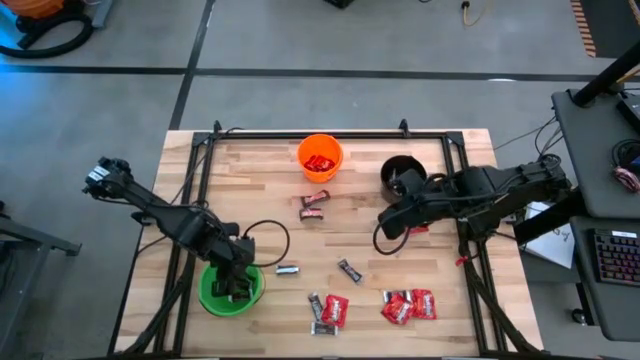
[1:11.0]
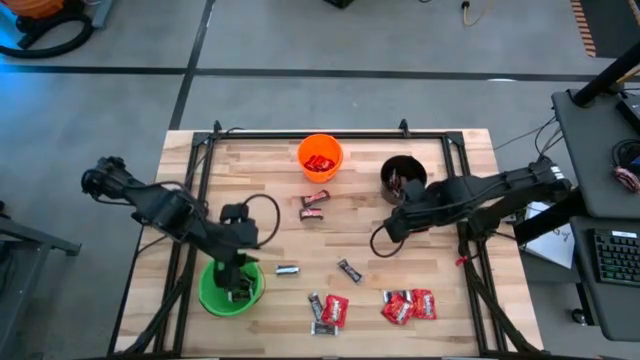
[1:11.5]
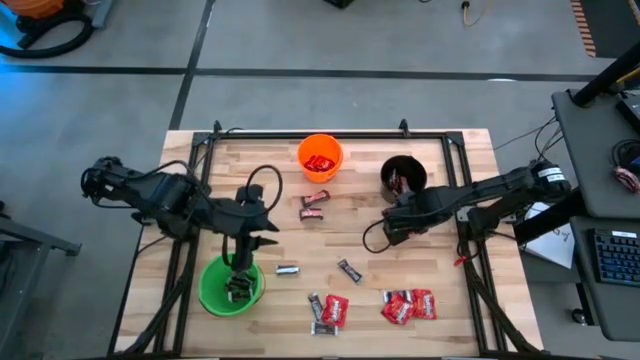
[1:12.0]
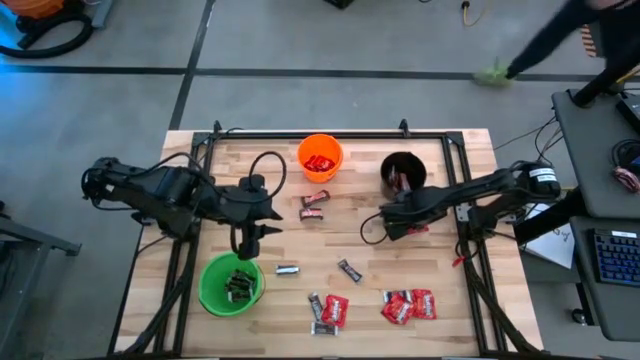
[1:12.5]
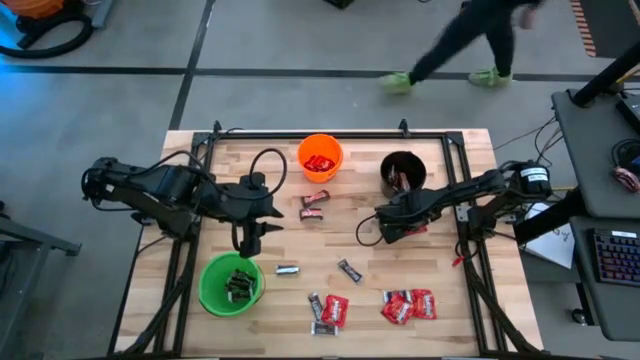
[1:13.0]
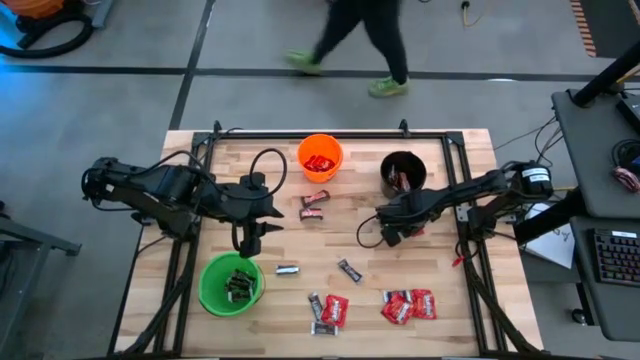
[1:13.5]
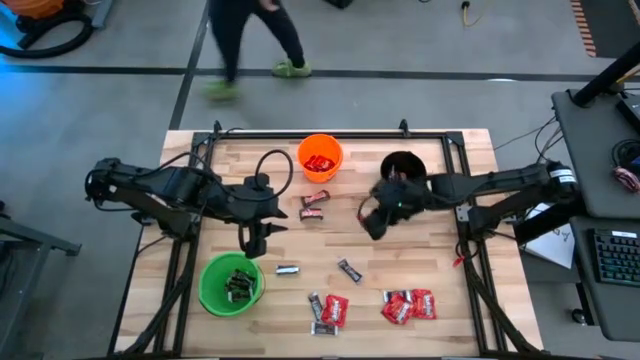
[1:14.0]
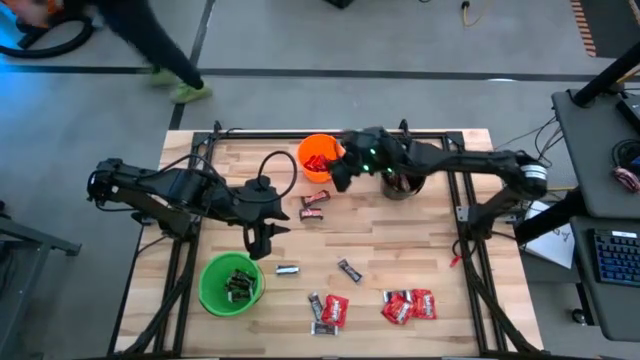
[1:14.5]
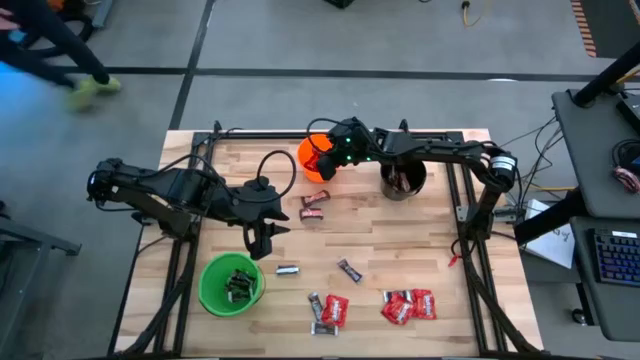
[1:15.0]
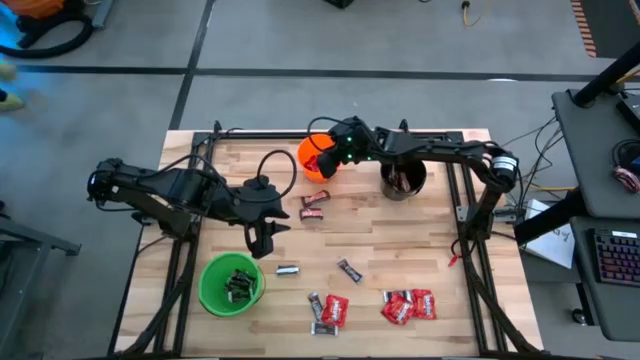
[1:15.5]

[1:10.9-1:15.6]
Task: Sort candy
Put the red candy into the orange bucket

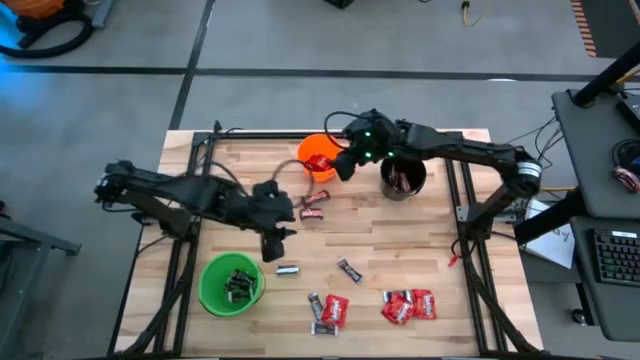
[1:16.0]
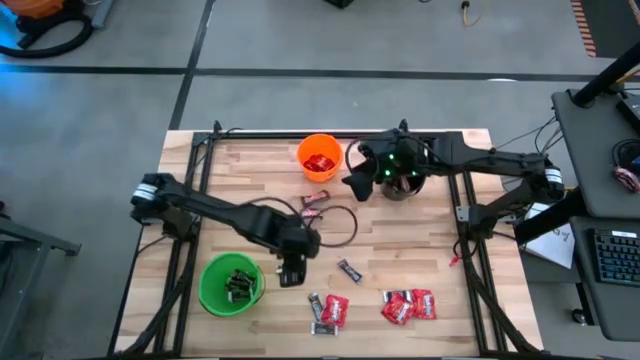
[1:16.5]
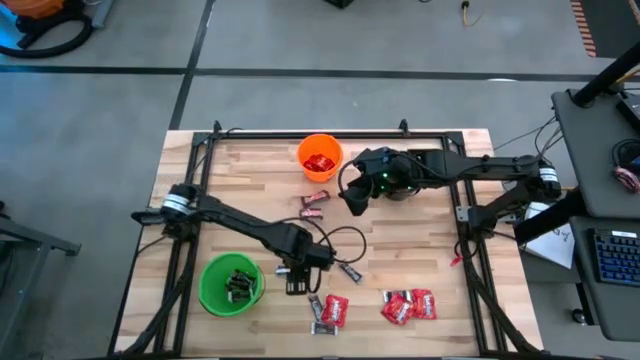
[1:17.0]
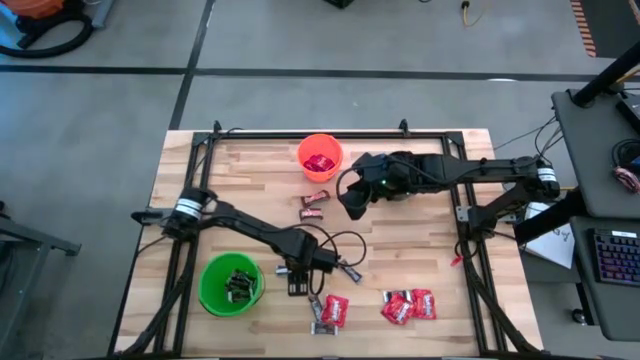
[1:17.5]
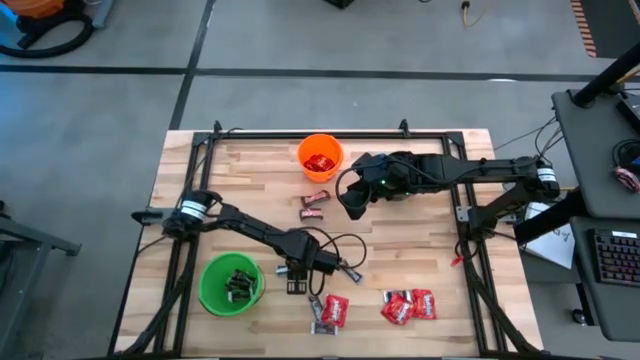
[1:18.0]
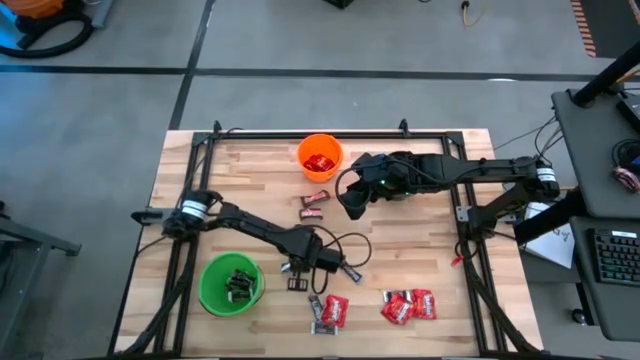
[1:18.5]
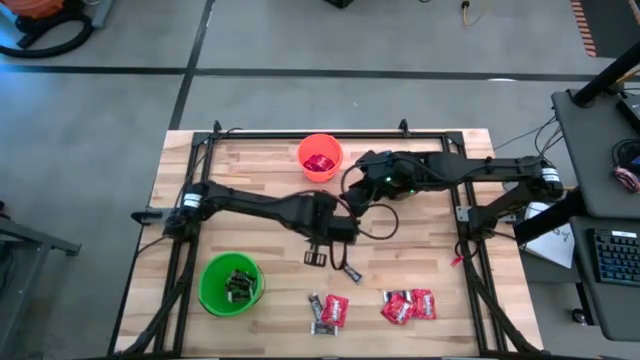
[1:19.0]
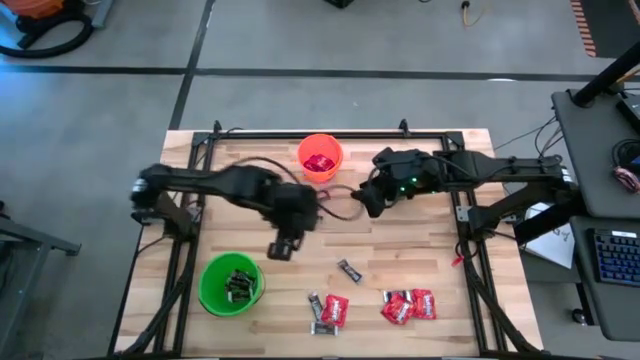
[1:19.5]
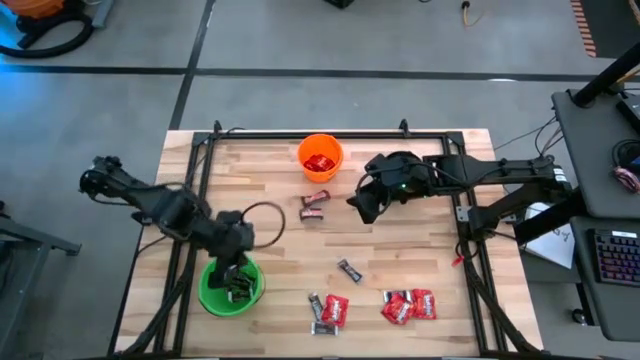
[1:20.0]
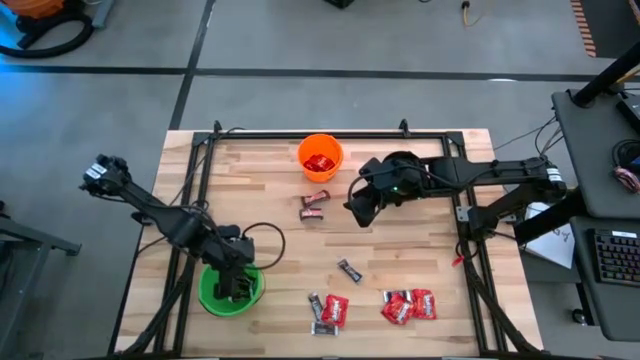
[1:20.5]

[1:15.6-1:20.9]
Put the black chocolate into the green bucket

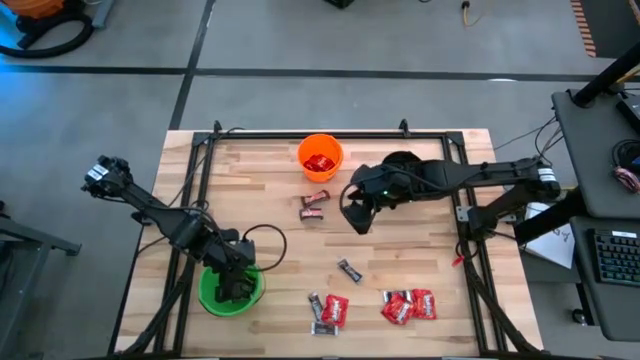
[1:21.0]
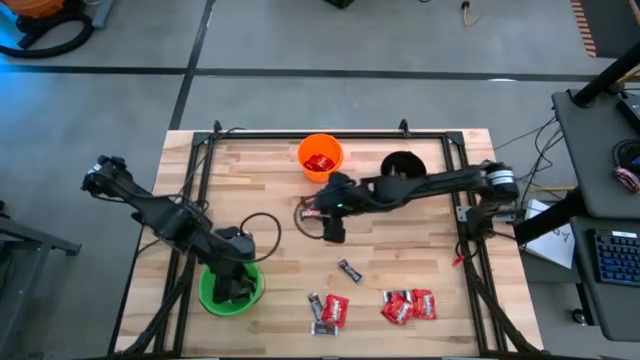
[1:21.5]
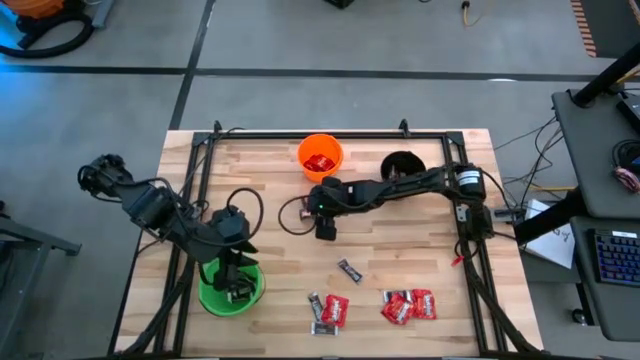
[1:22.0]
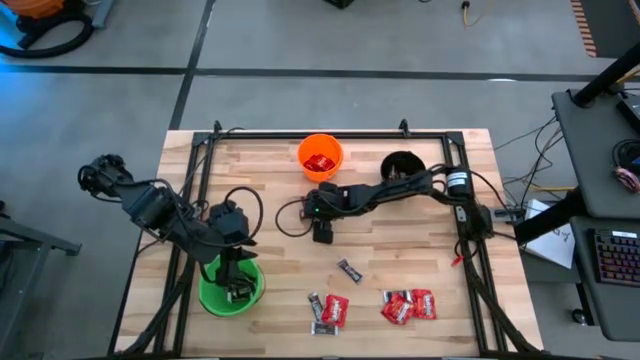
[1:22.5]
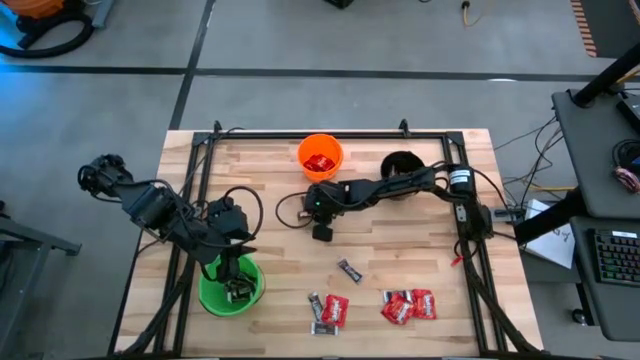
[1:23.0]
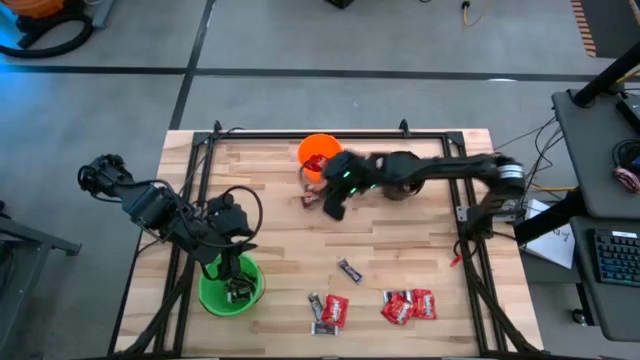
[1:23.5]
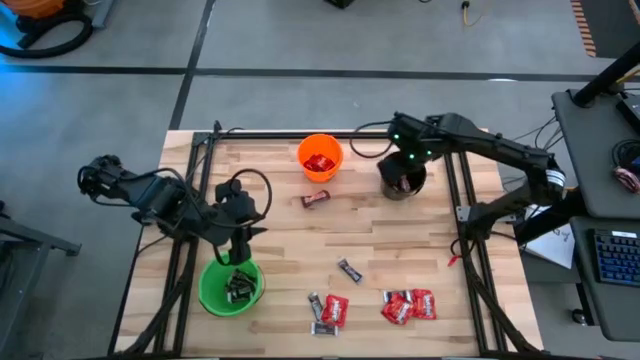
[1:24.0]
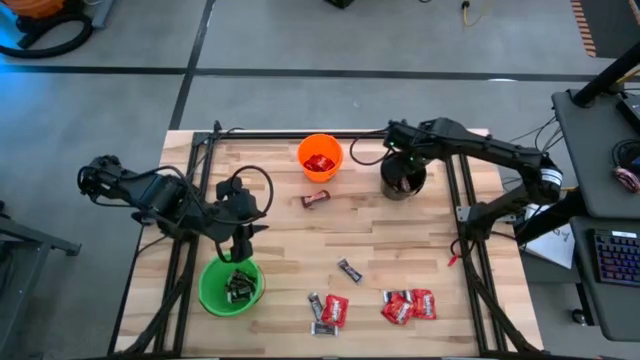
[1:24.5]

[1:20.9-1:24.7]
Put the brown chocolate into the black bucket

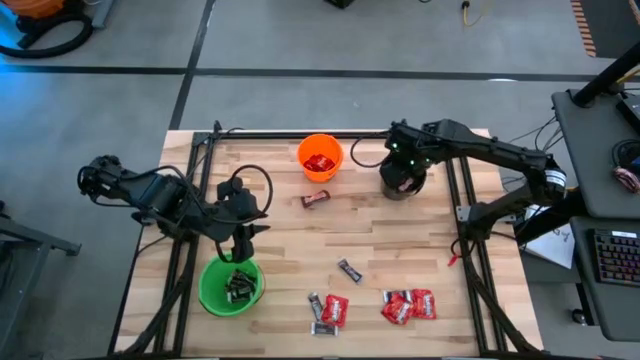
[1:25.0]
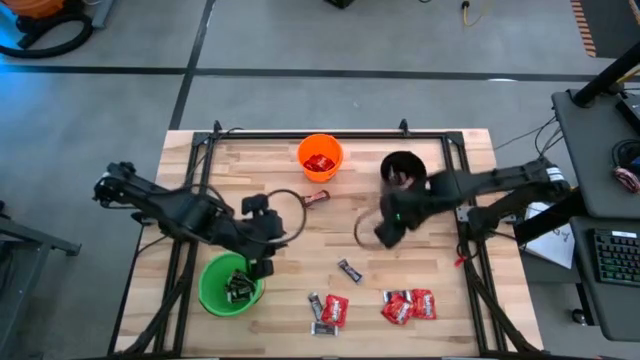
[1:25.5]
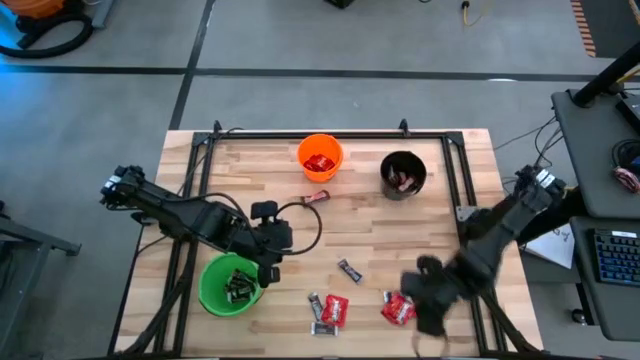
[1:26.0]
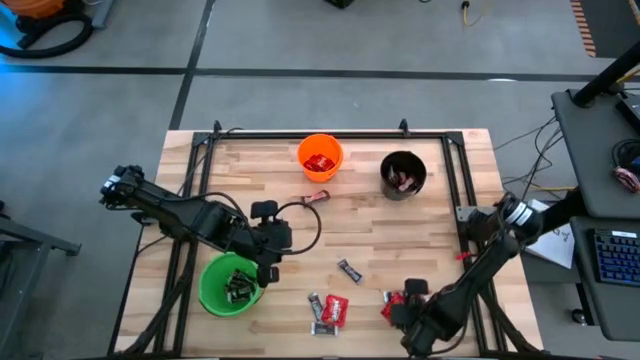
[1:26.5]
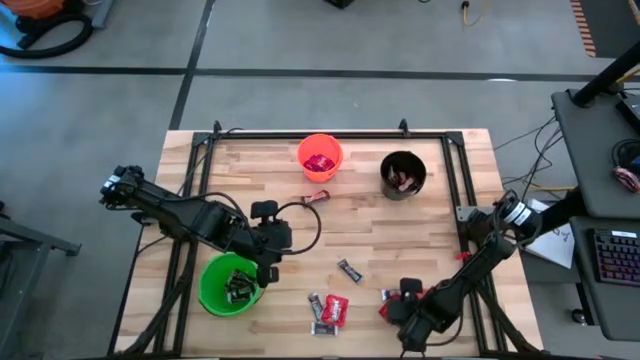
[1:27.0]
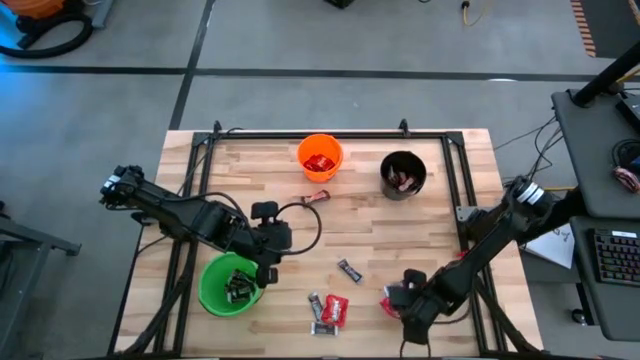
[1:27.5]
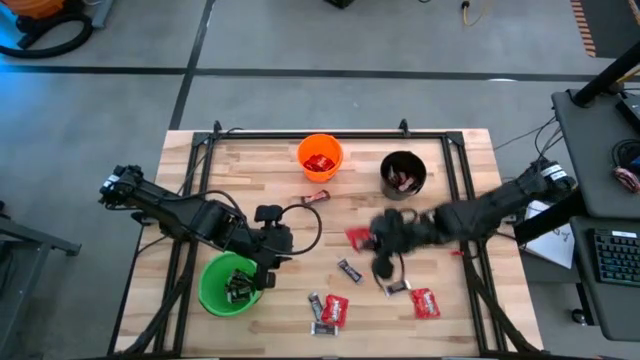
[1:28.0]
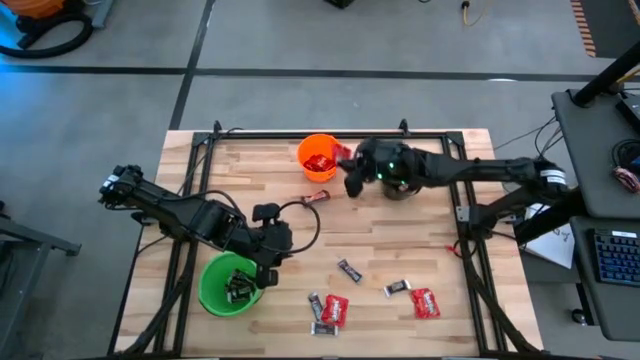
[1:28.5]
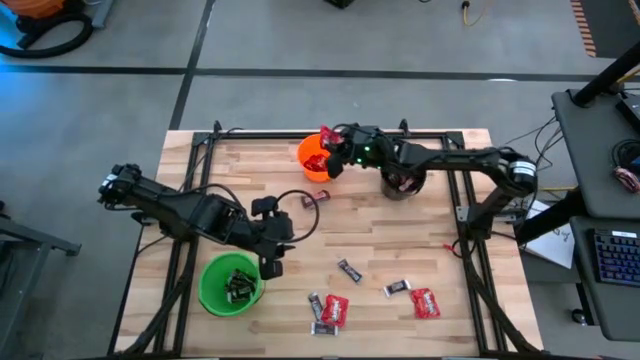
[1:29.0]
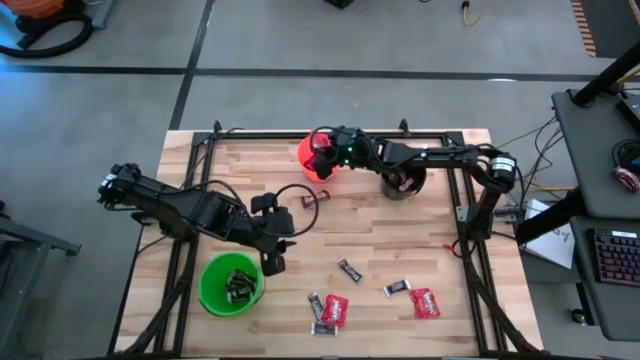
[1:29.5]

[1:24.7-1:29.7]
Put the red candy into the orange bucket

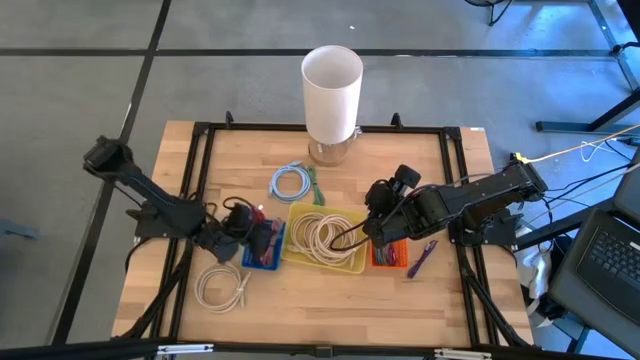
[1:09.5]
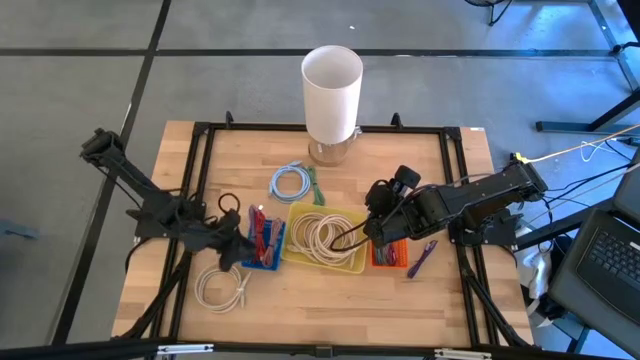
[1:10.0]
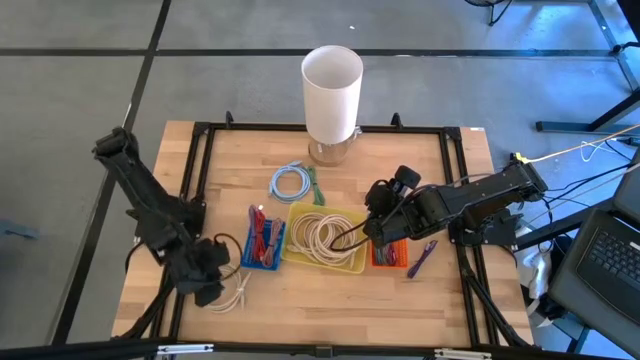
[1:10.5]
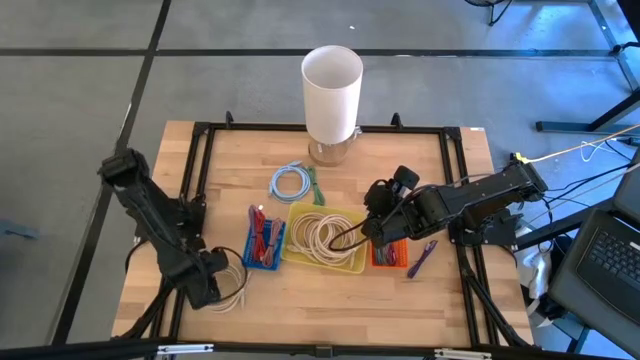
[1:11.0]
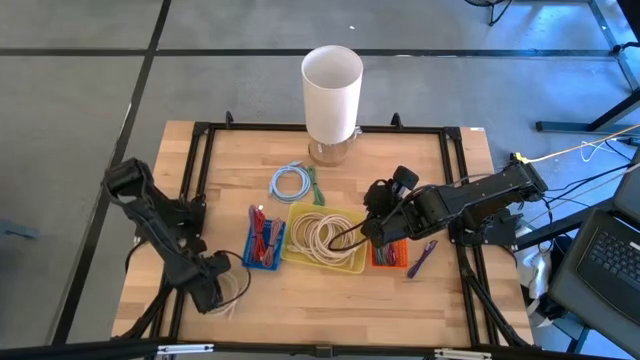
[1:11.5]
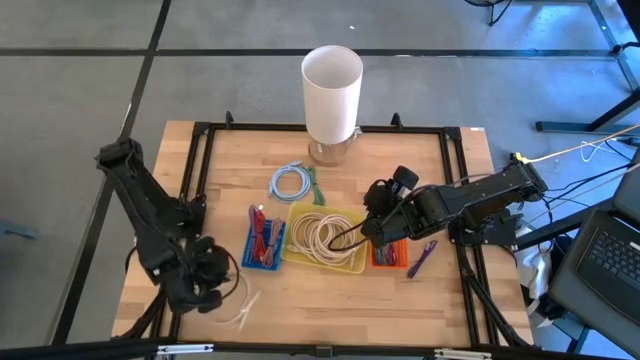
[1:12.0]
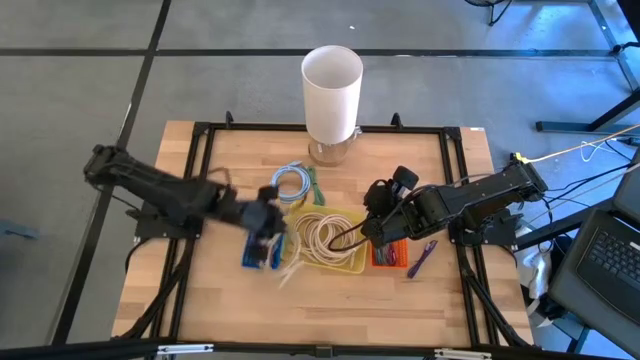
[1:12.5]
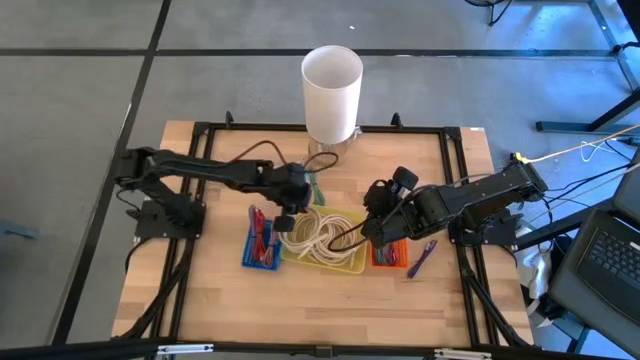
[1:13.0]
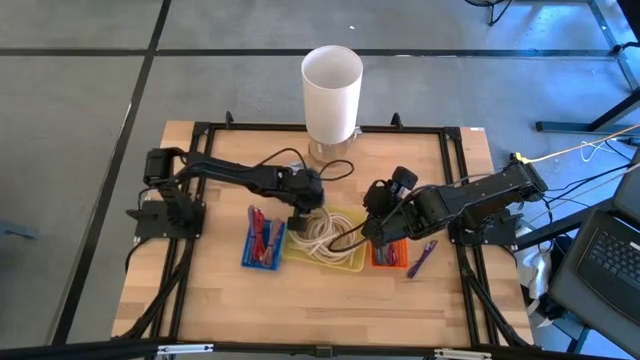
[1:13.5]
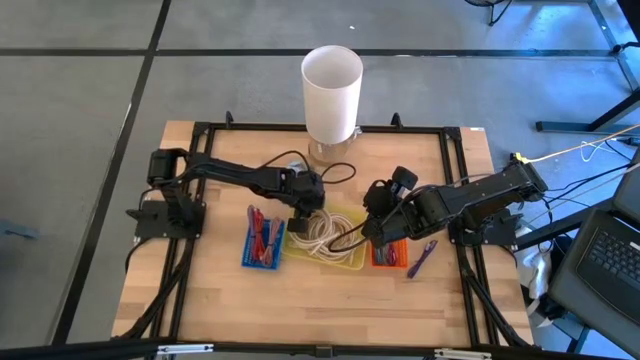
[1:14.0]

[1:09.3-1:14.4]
Task: Pick & Place USB Port
Put the white charger cable into the yellow bin
